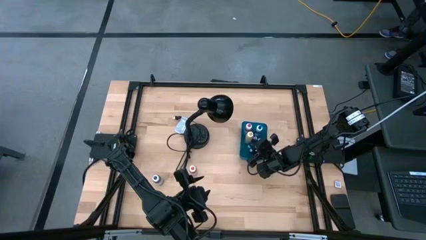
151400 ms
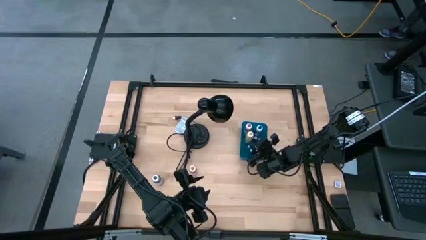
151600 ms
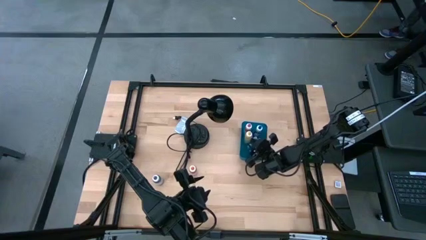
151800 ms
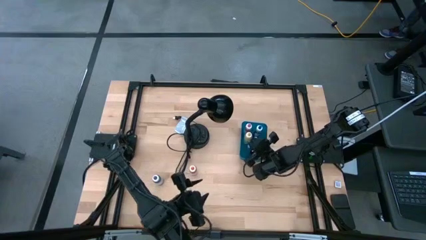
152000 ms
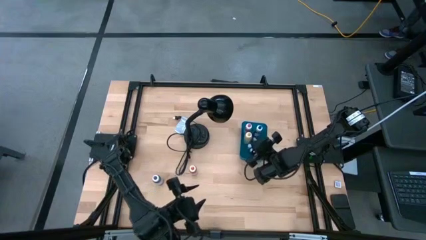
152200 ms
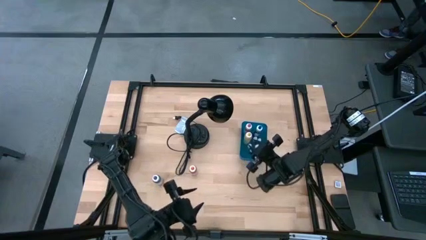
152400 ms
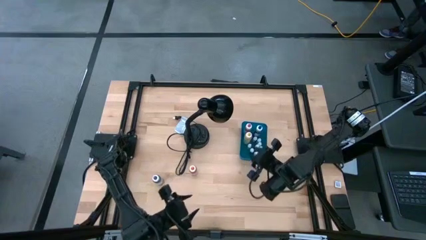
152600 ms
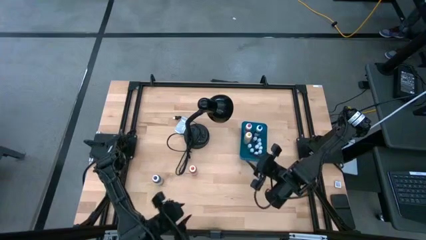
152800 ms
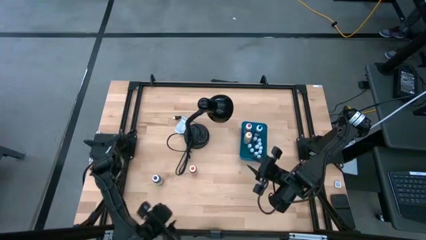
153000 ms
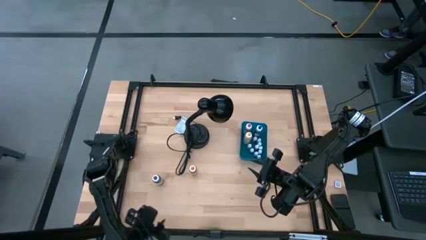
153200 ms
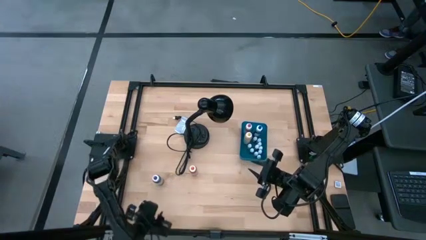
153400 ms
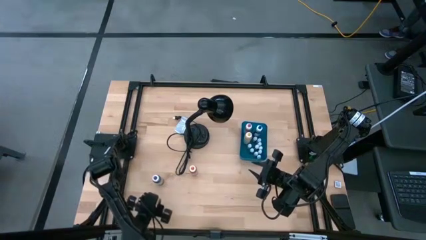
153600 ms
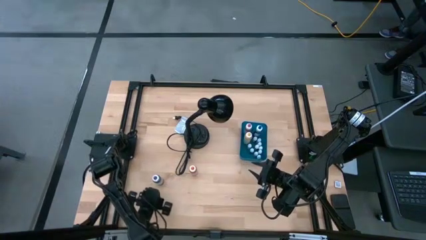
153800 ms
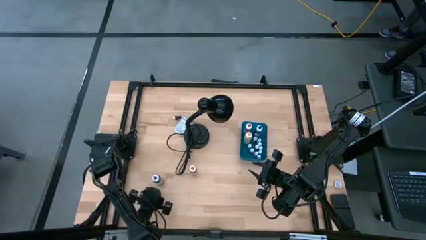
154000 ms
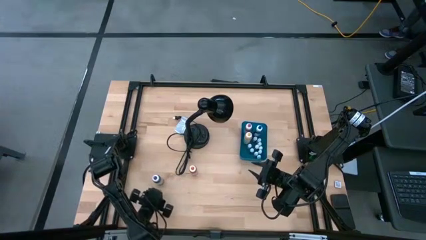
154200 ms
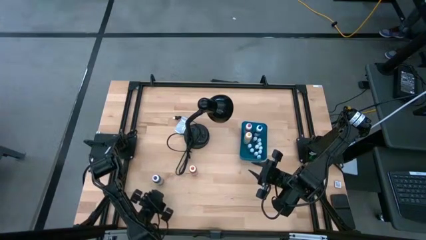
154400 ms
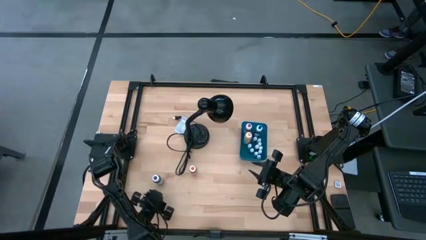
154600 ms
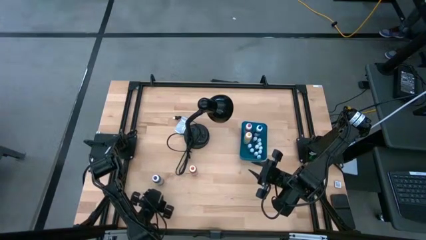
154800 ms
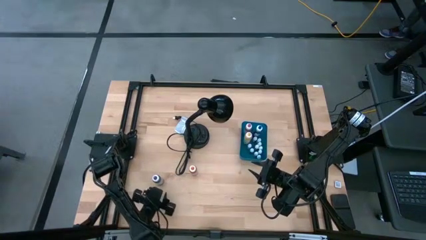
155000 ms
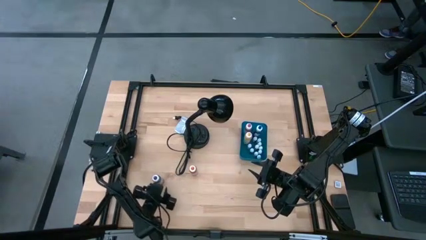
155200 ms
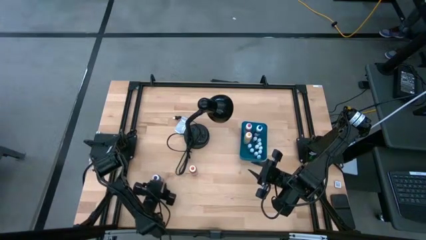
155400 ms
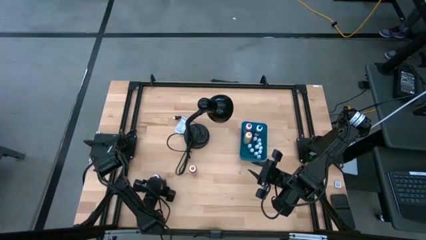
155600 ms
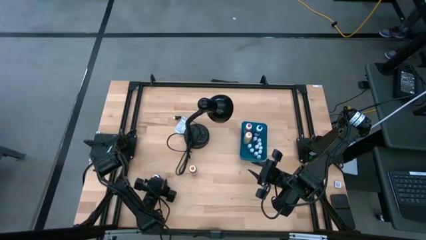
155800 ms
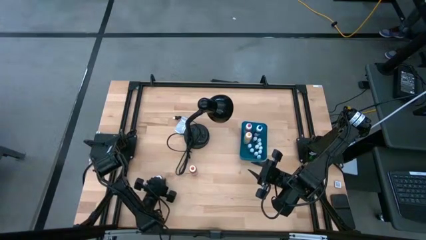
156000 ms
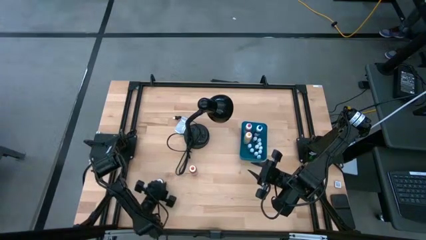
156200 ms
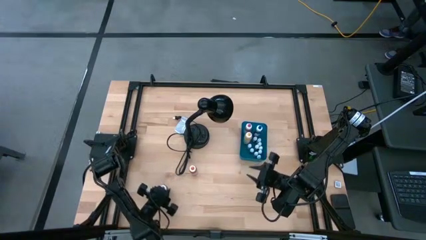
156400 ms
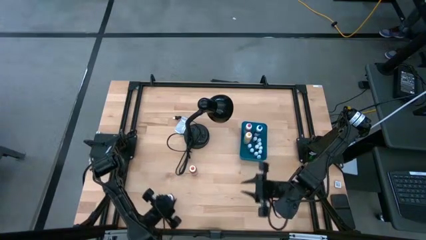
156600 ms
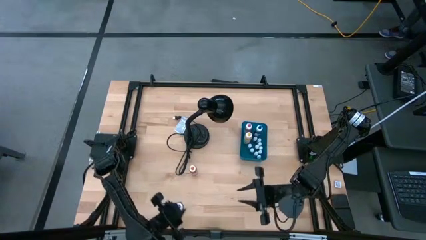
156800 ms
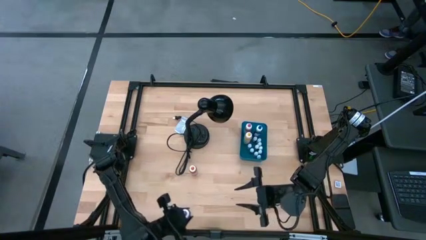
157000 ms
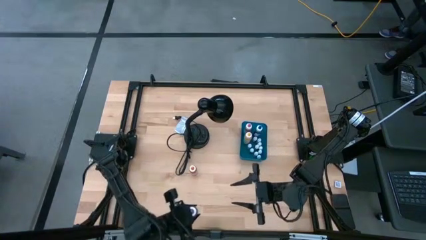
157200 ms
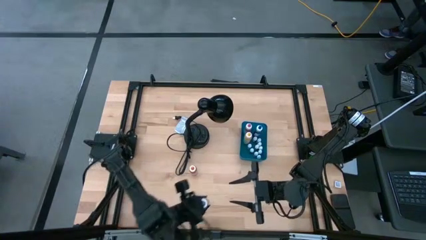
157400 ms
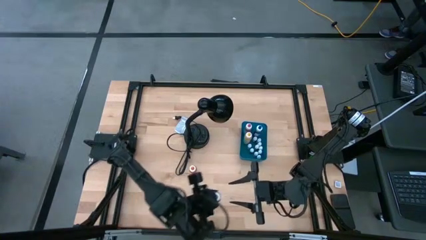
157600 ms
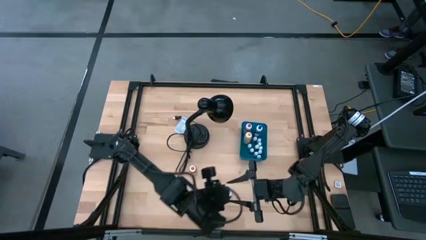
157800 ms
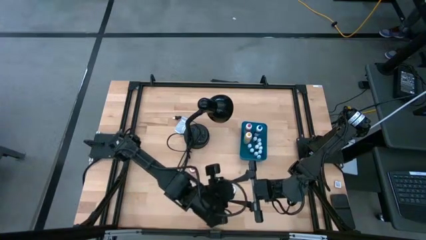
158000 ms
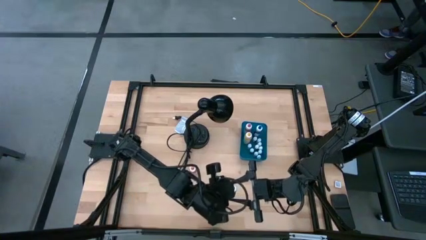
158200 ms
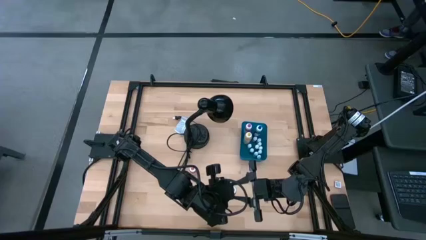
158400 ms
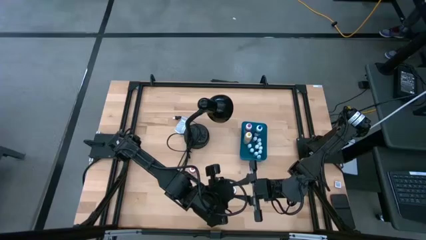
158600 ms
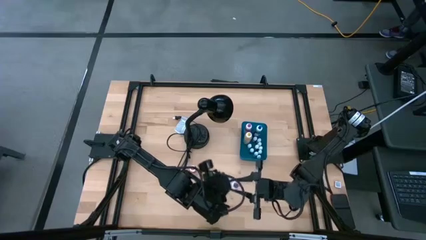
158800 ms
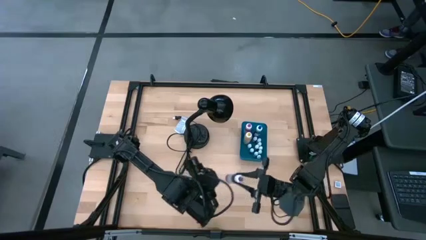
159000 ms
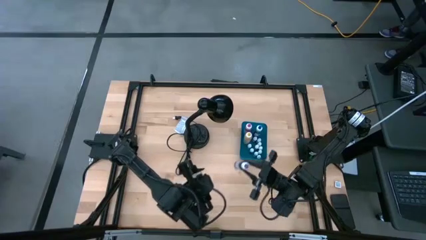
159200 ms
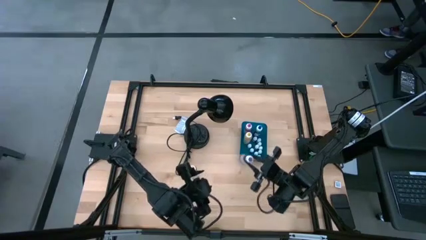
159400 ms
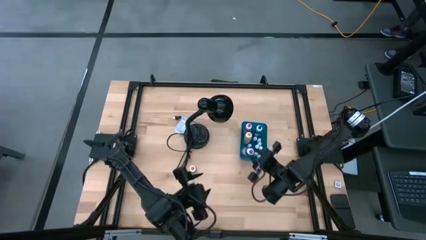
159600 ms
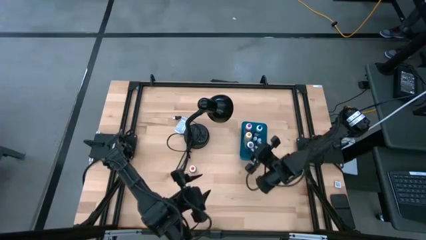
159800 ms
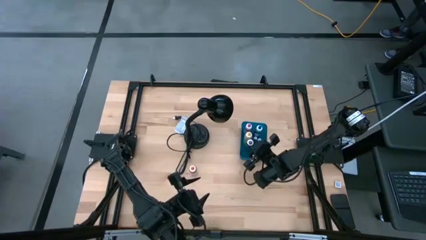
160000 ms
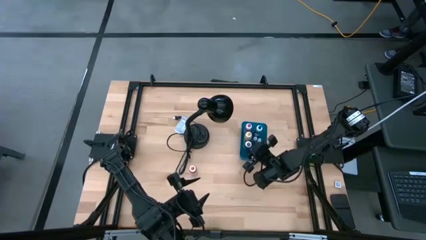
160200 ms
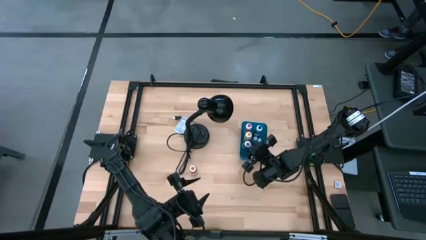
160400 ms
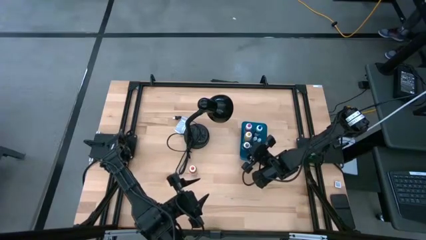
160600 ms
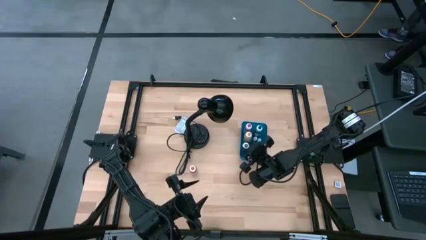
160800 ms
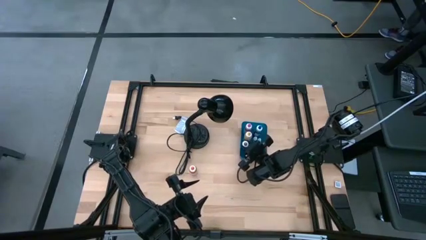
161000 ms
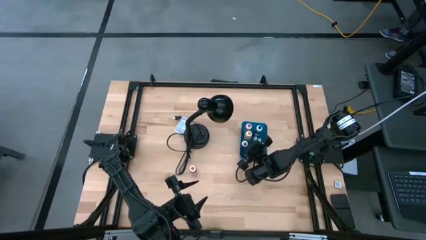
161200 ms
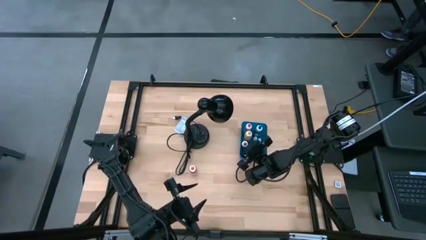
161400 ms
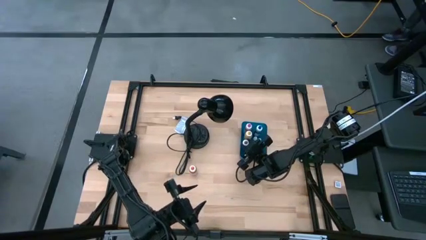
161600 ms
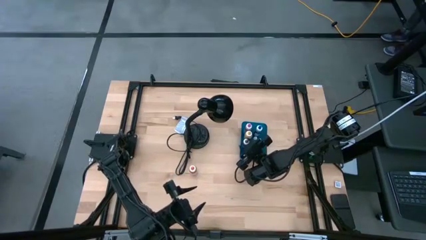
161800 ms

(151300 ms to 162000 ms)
Task: Pick & Place food coloring
Put the large purple food coloring bottle into the blue bin
